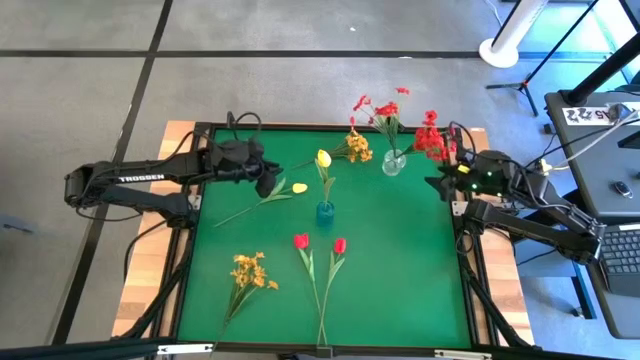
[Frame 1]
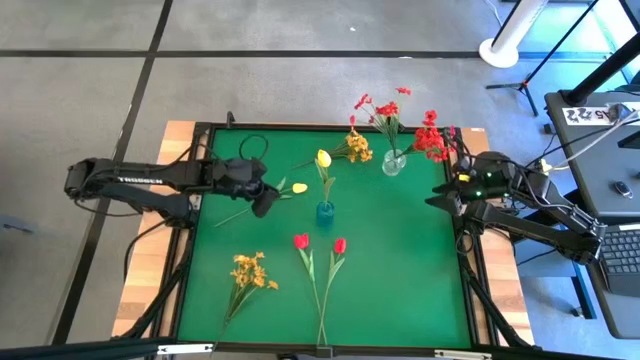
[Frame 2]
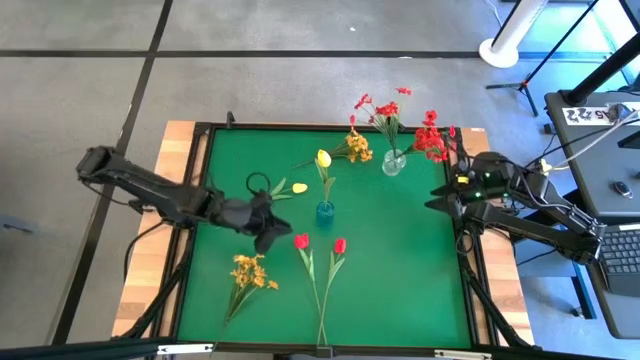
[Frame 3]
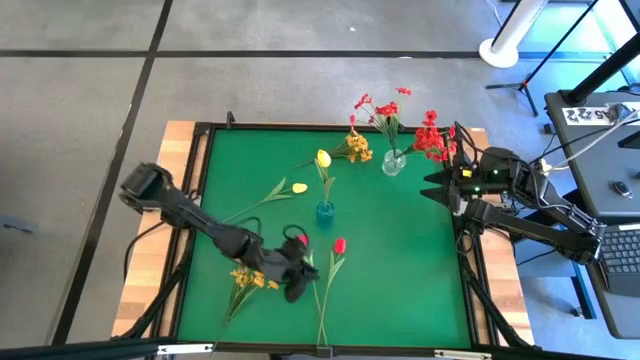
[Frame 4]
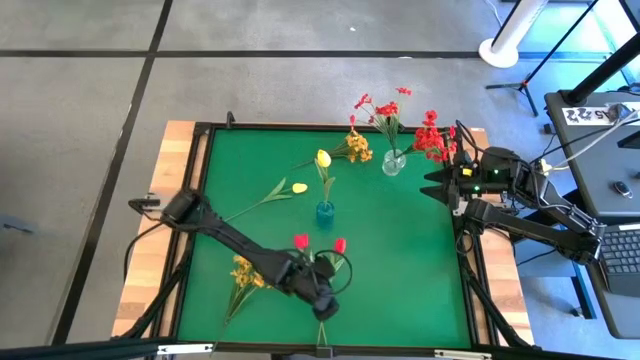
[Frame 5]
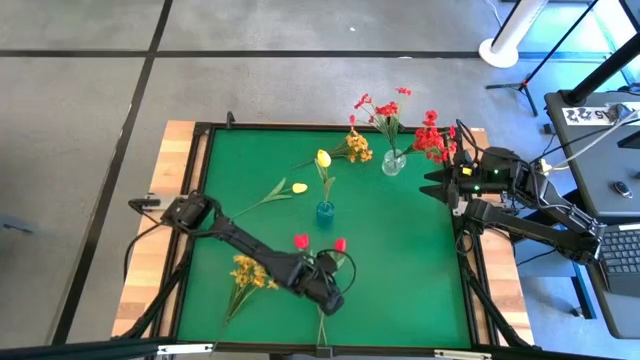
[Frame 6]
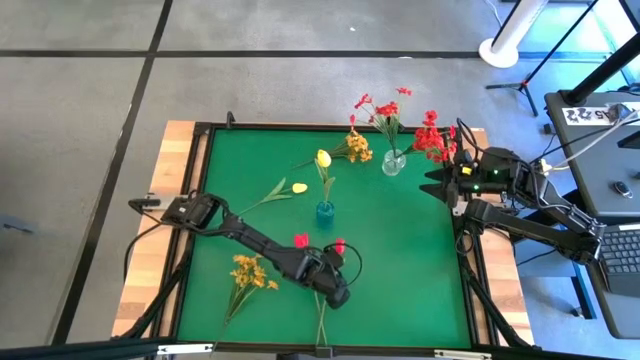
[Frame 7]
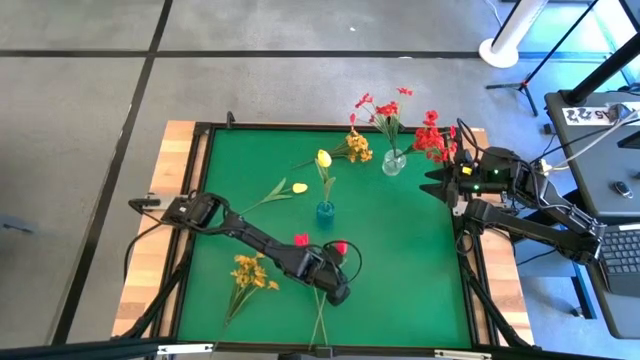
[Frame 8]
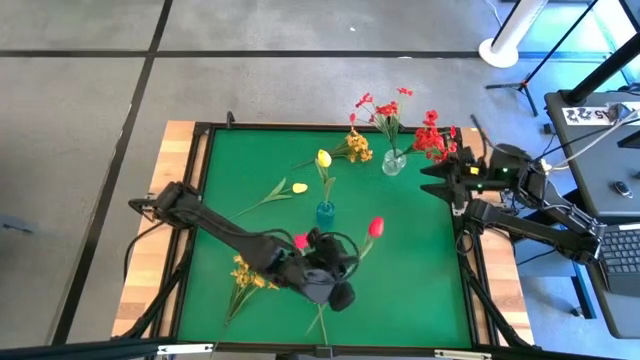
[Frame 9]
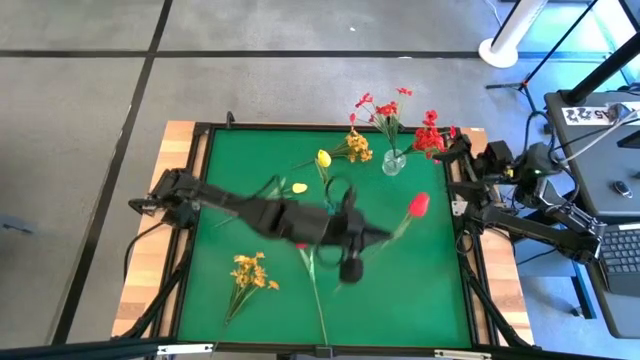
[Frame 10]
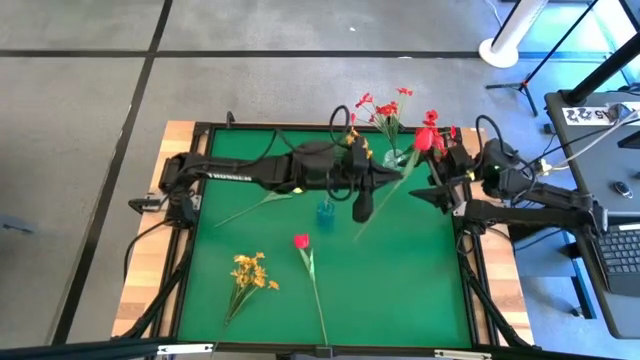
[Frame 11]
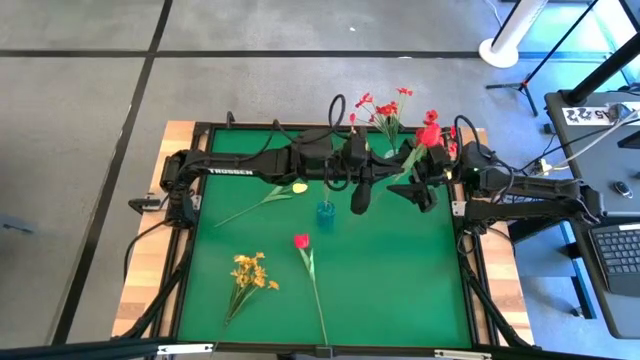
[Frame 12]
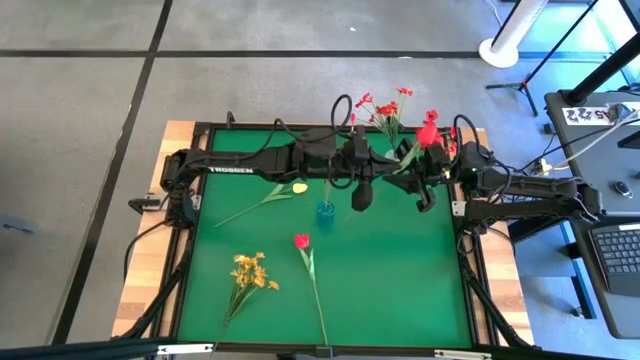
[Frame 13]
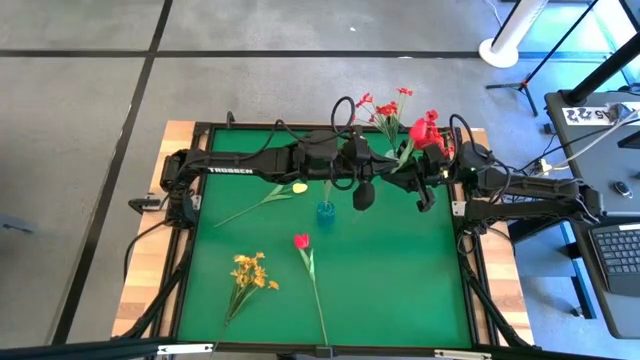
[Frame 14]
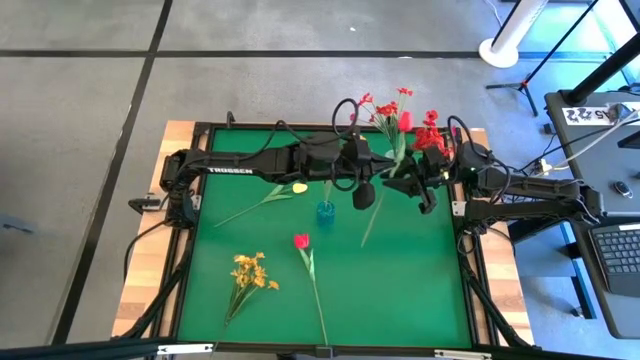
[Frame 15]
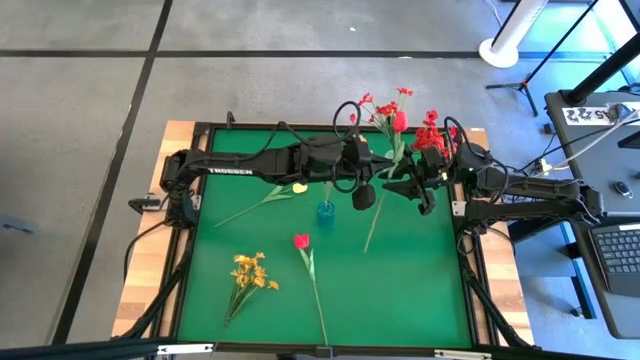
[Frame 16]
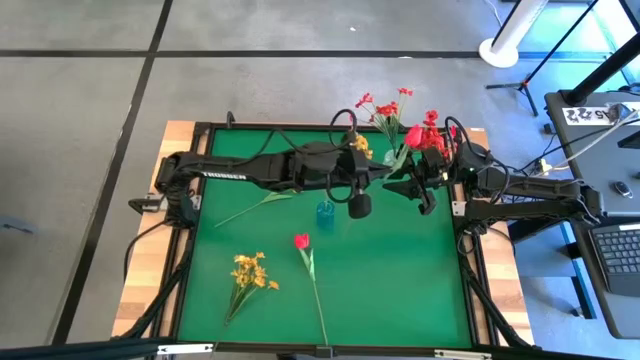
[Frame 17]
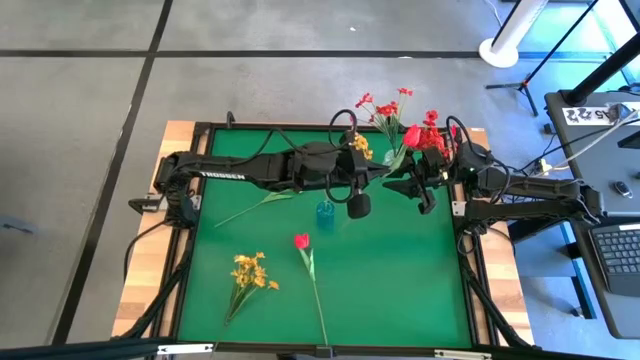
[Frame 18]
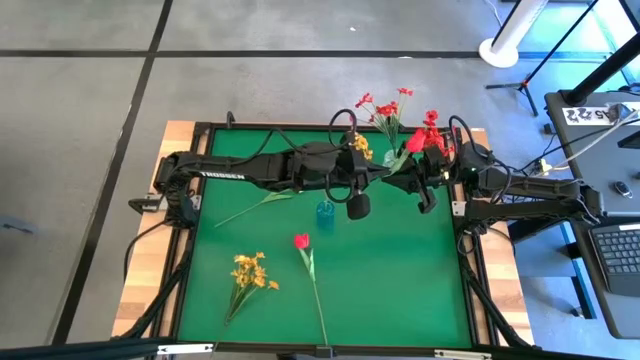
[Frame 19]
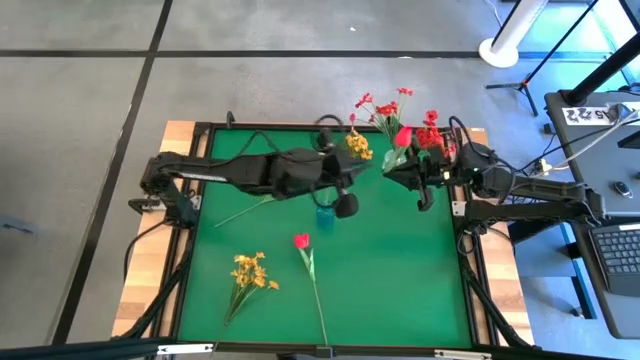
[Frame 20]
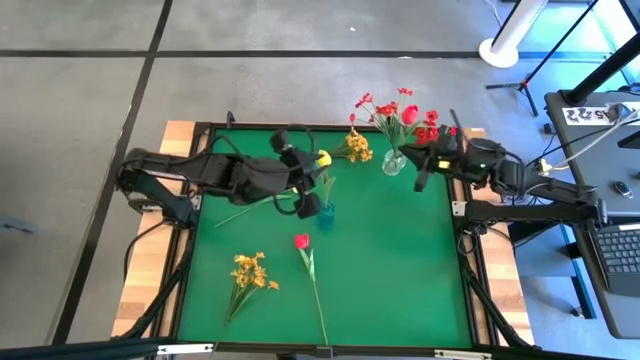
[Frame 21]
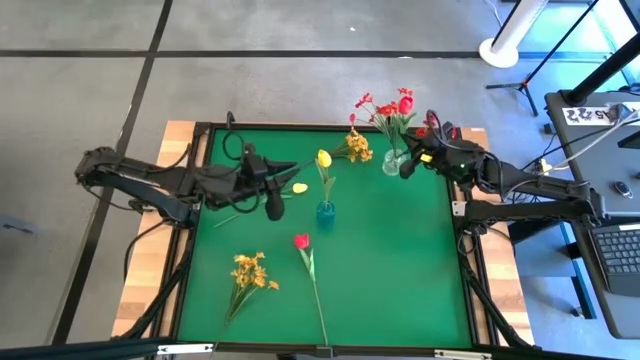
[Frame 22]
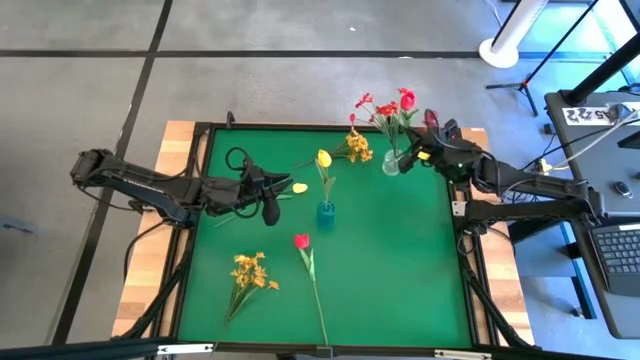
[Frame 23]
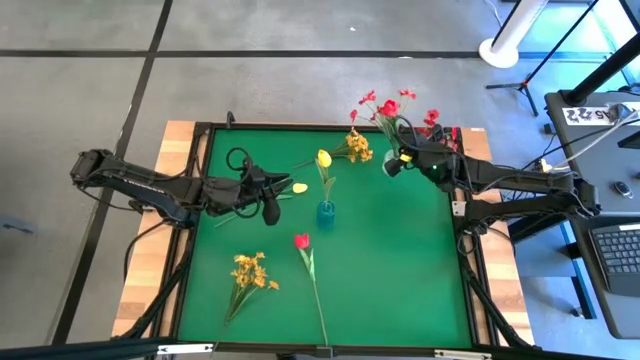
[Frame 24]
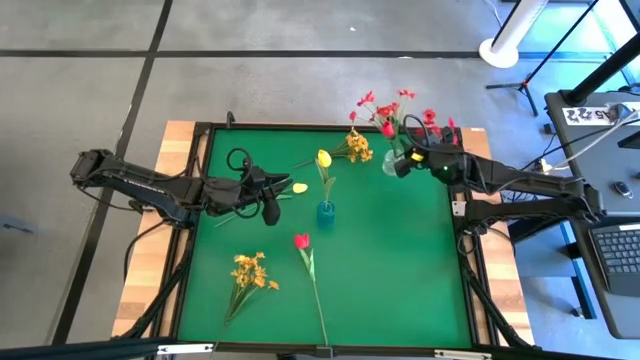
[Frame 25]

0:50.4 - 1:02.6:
Task: Sort flowers into vase by color
Put the red flower into the transparent vase

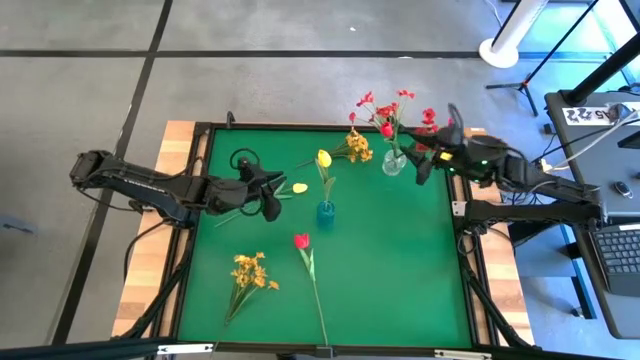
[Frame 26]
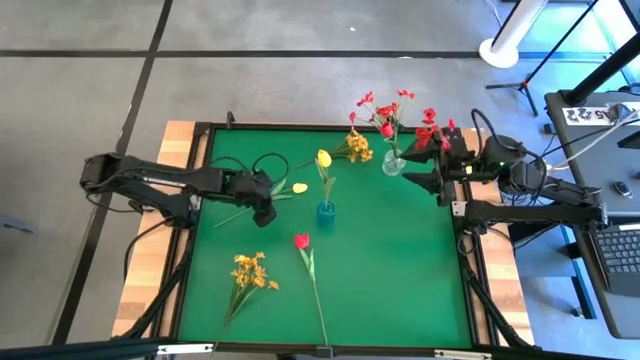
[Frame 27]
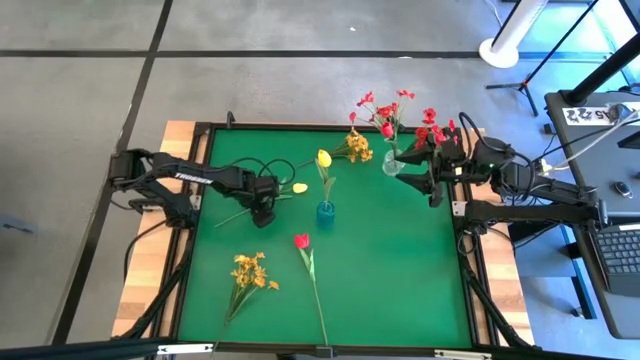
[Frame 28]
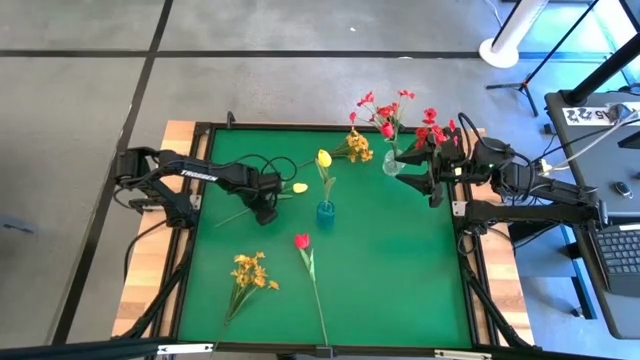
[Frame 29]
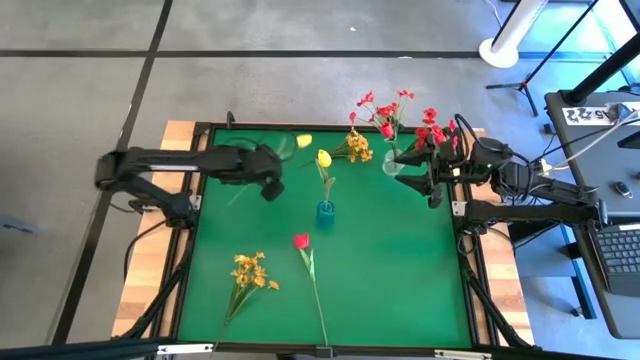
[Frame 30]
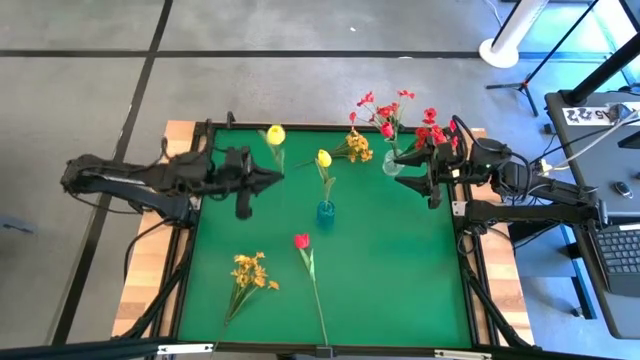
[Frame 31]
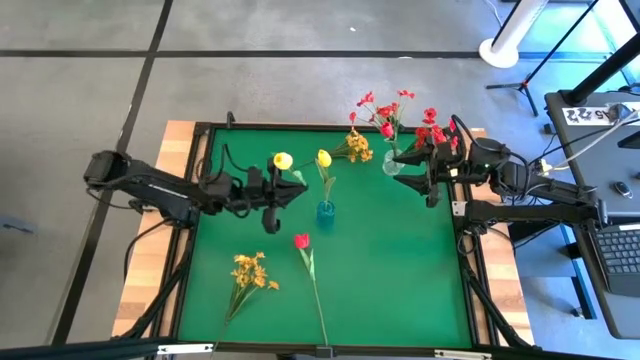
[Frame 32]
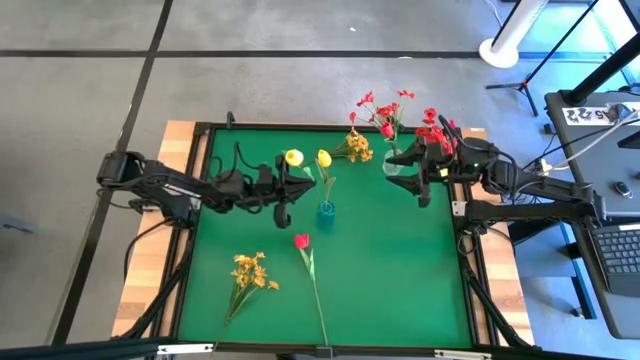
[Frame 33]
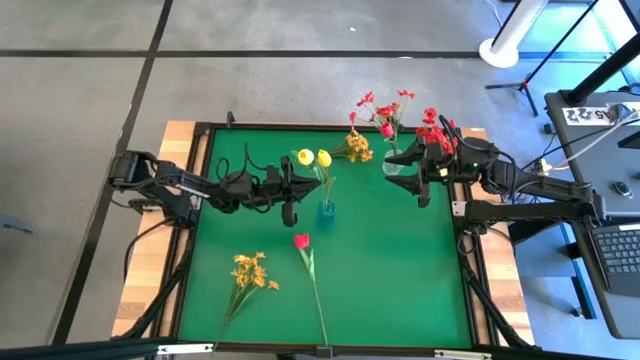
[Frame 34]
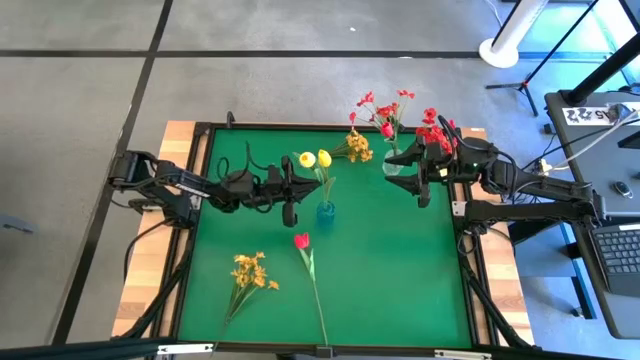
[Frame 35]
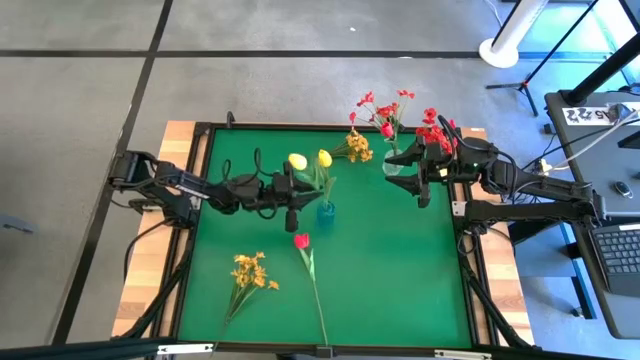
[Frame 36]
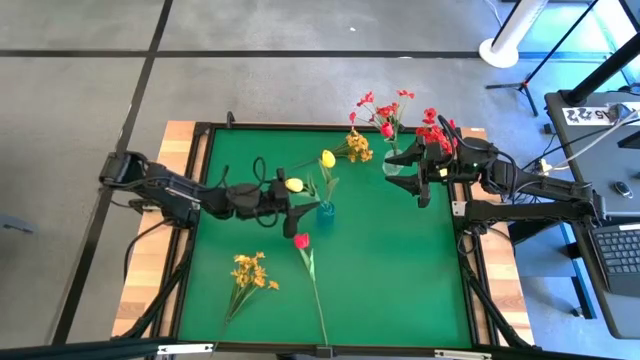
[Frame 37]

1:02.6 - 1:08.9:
Put the yellow flower into the blue vase

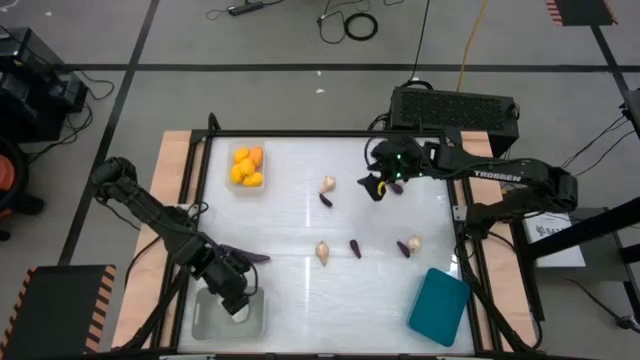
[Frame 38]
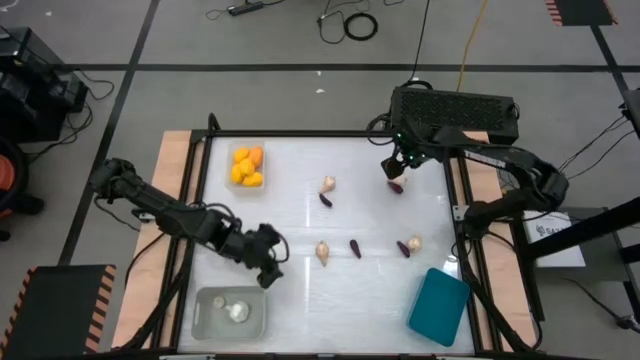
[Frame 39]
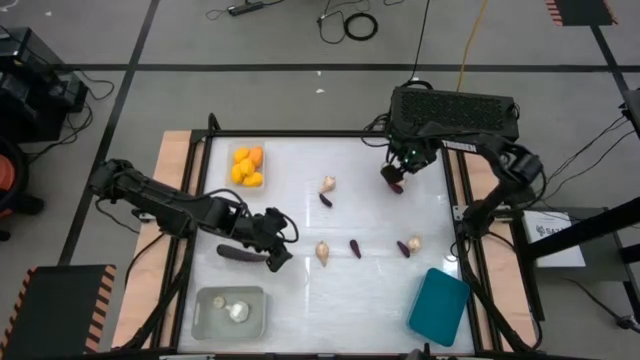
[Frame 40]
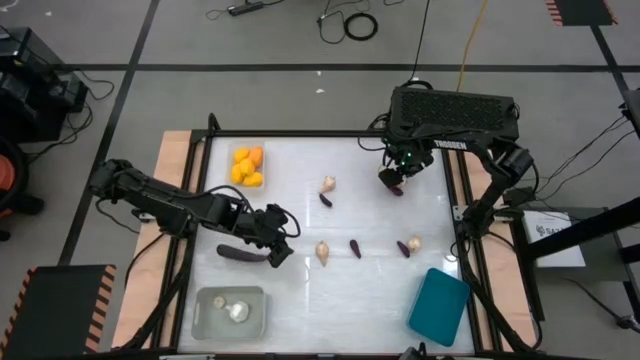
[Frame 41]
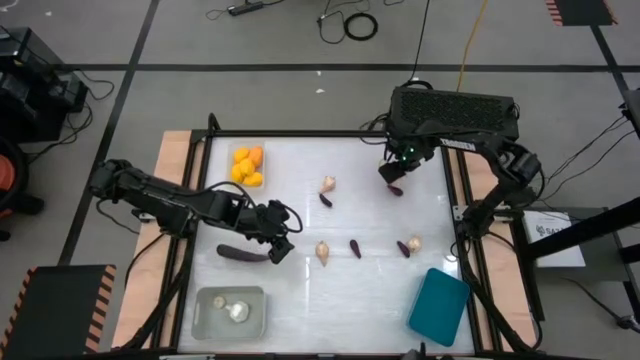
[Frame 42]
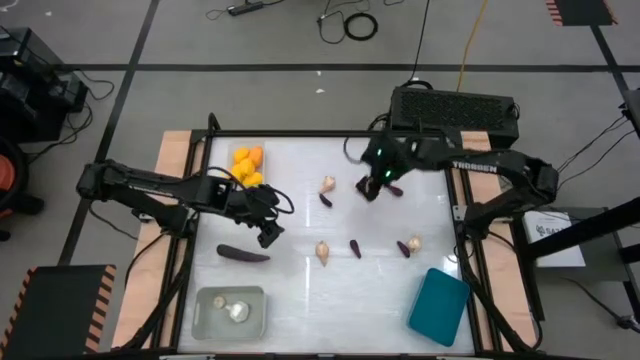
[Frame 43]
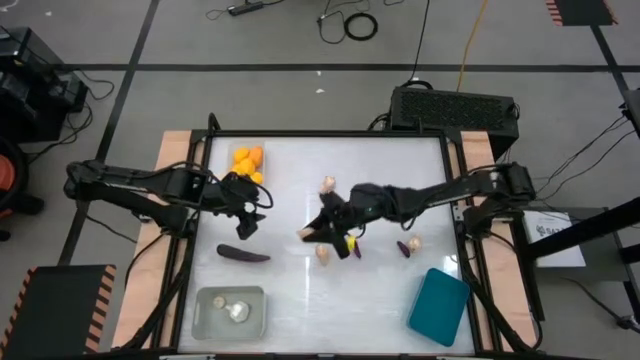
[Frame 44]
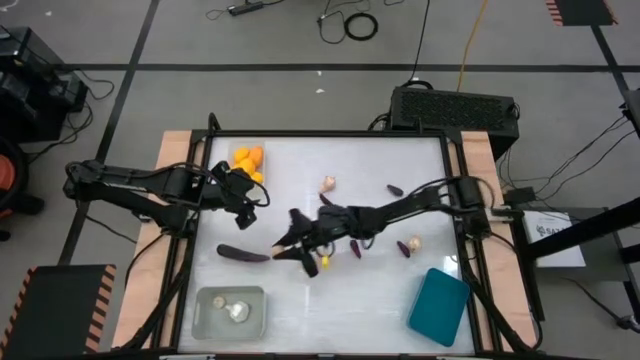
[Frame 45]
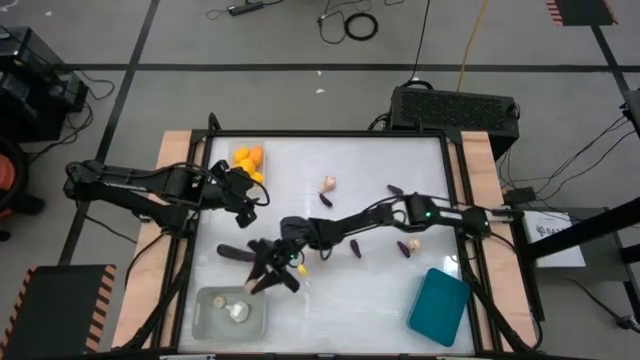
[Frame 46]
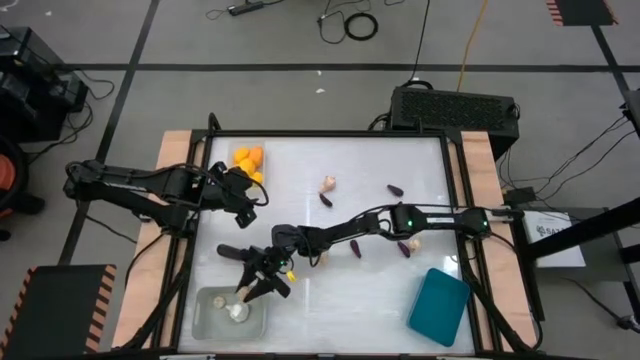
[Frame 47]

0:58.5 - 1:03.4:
Task: Sort produce into baskets
Put the white garlic into the gray bin
